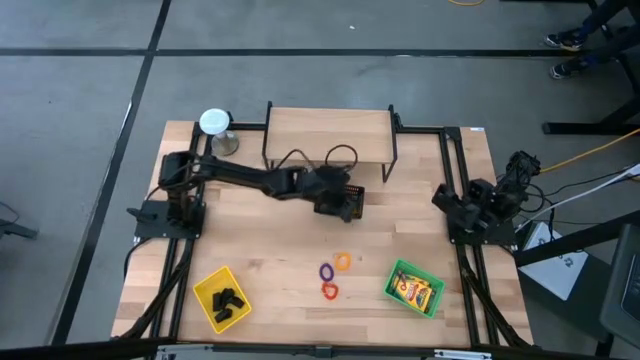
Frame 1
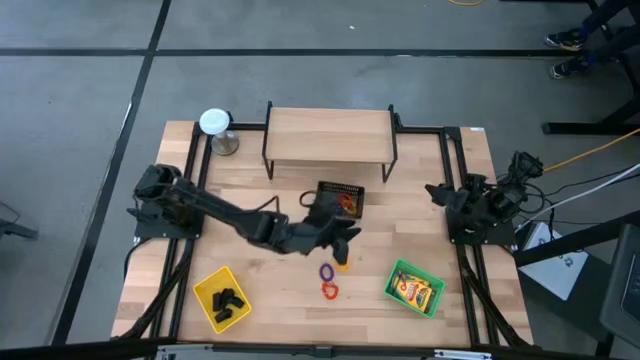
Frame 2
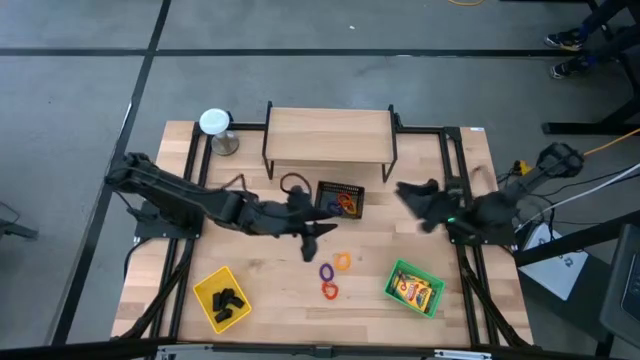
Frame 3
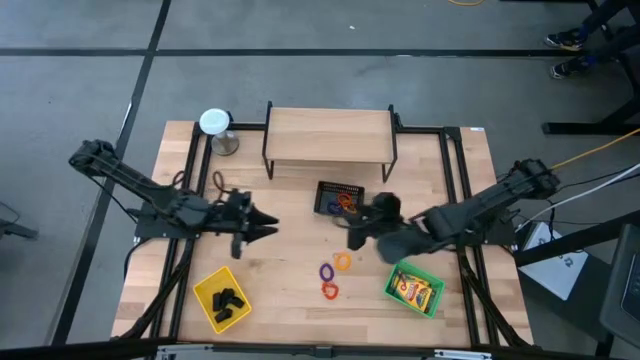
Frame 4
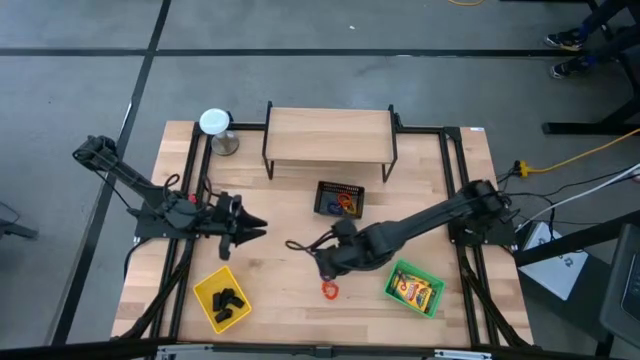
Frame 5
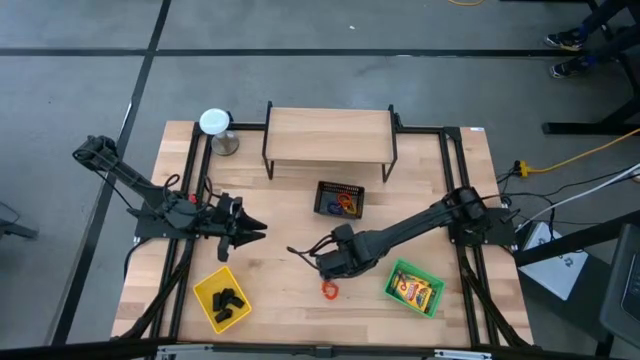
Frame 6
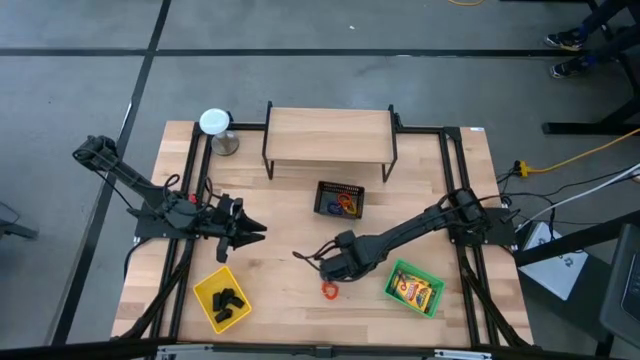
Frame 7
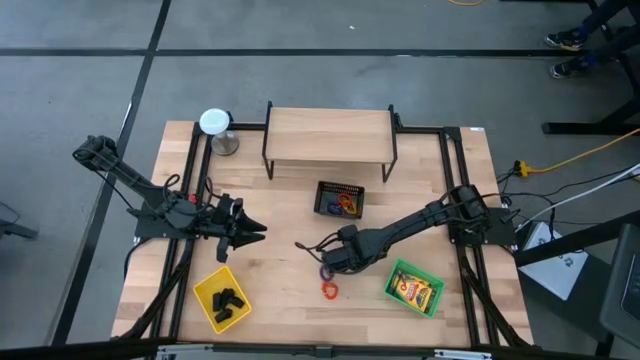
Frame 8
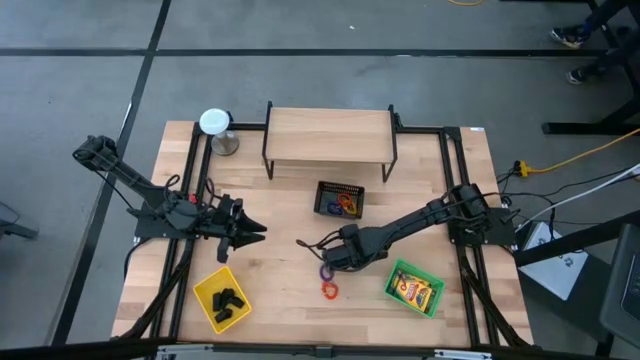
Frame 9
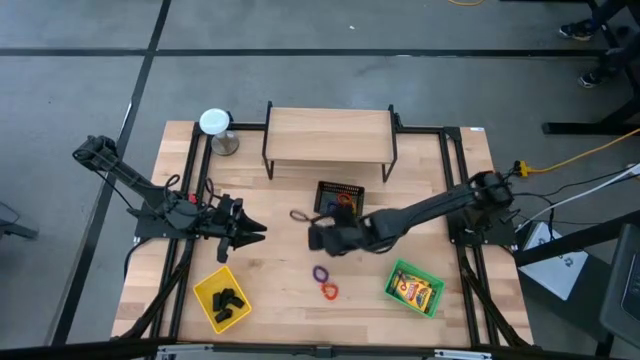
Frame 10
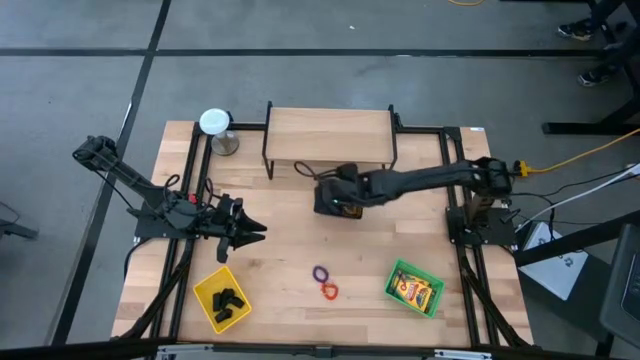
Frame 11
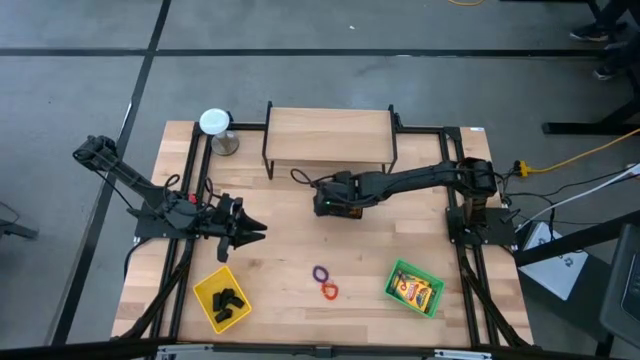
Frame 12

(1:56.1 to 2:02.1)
Task: Pick & Place Office Desk Supplies
Put the yellow spring keychain into the black basket

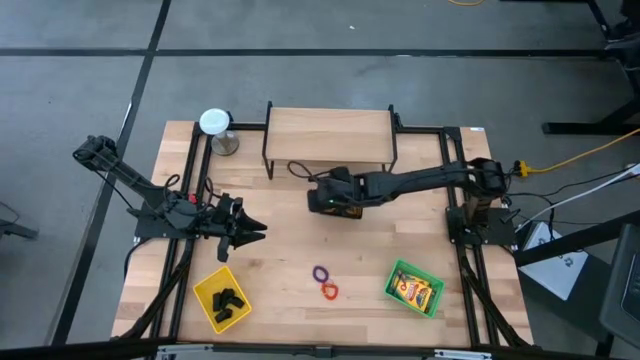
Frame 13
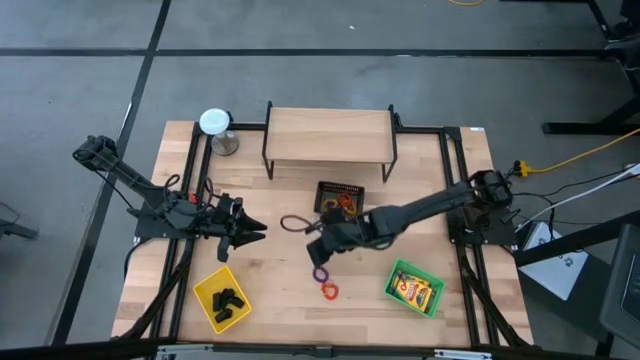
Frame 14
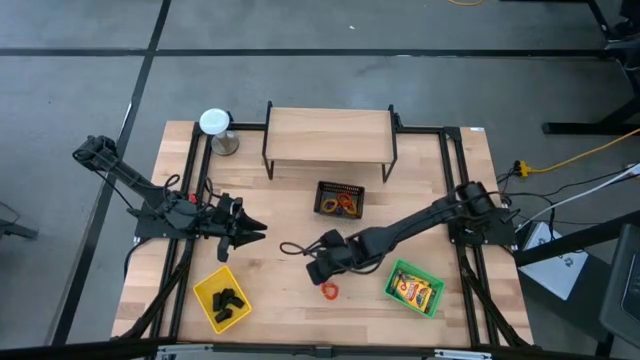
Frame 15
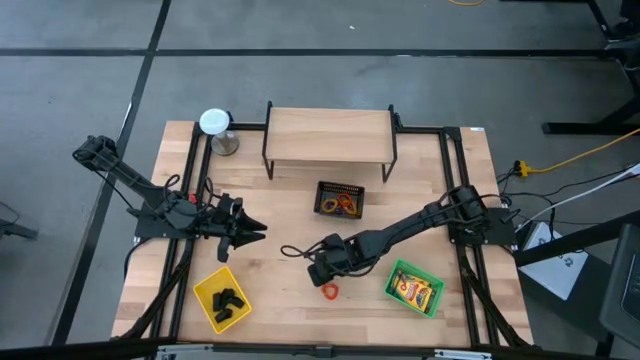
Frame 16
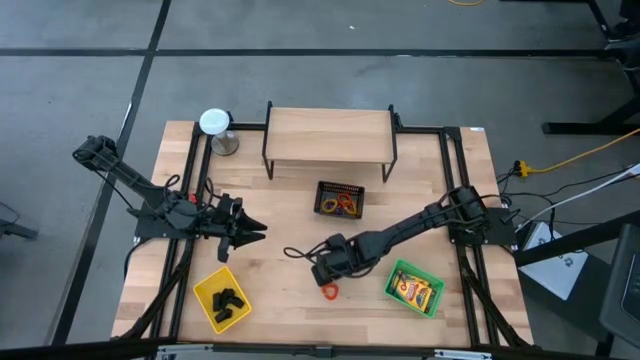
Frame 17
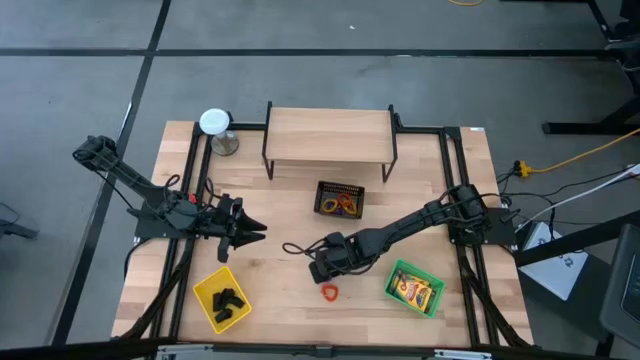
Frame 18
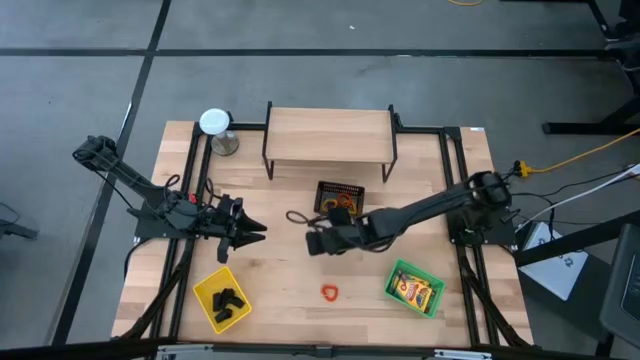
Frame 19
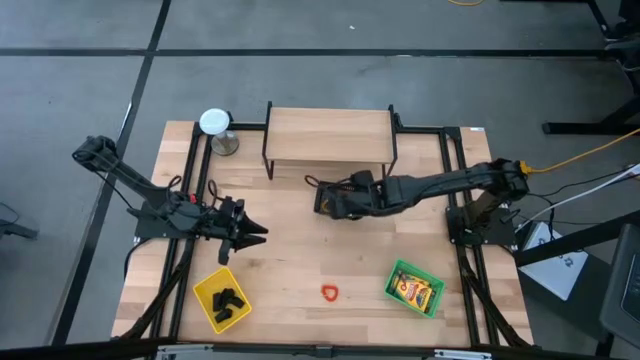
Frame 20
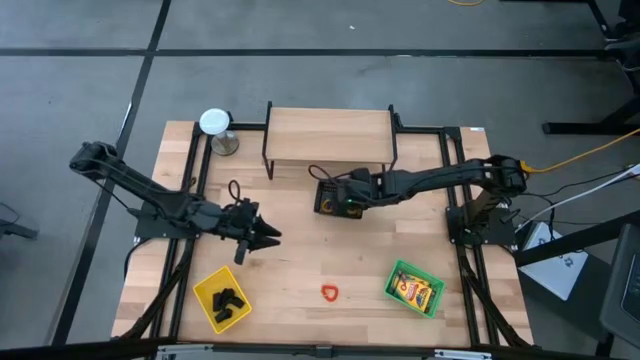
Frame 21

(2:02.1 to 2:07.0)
Put the purple spring keychain into the black basket

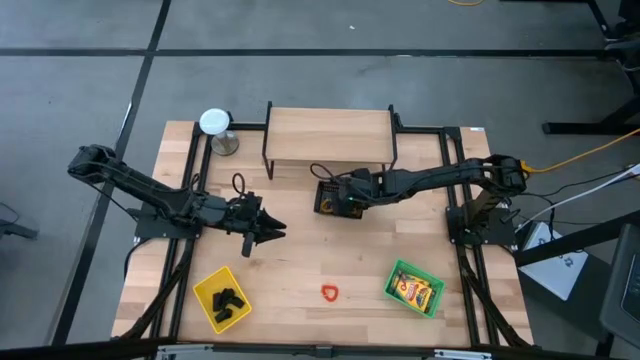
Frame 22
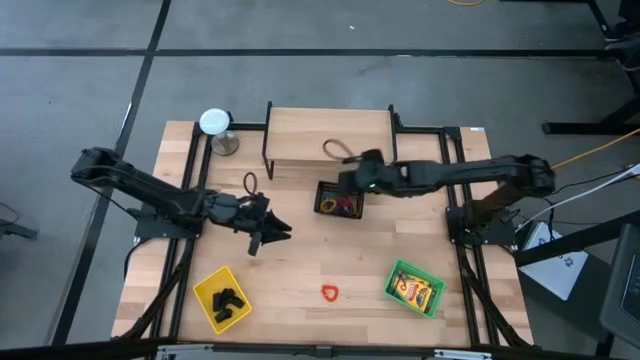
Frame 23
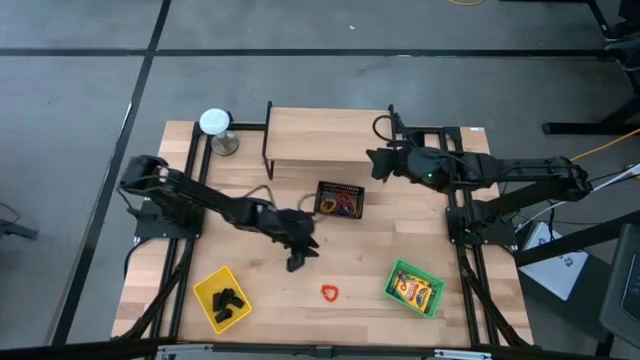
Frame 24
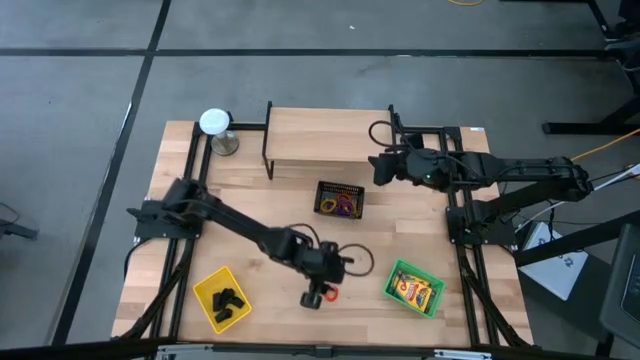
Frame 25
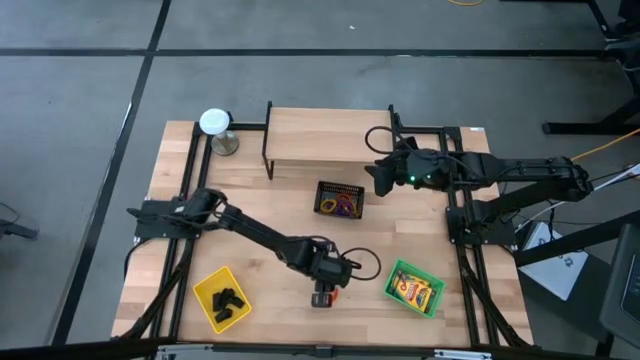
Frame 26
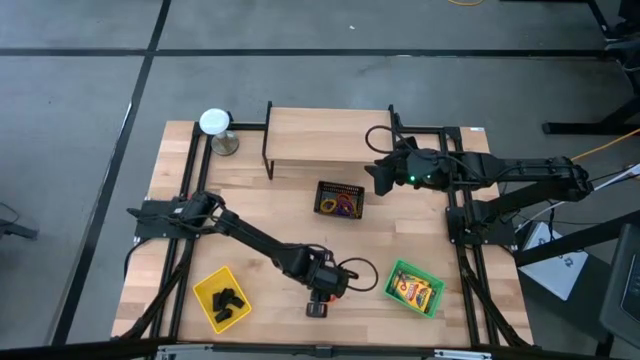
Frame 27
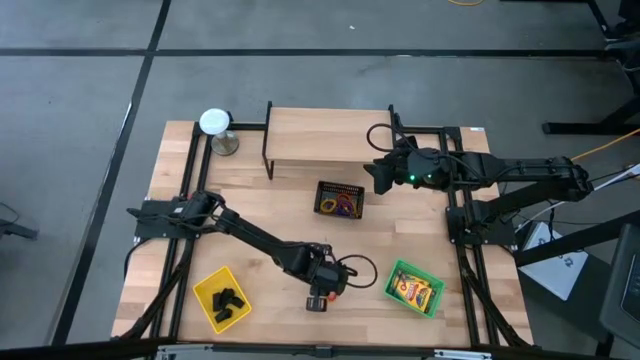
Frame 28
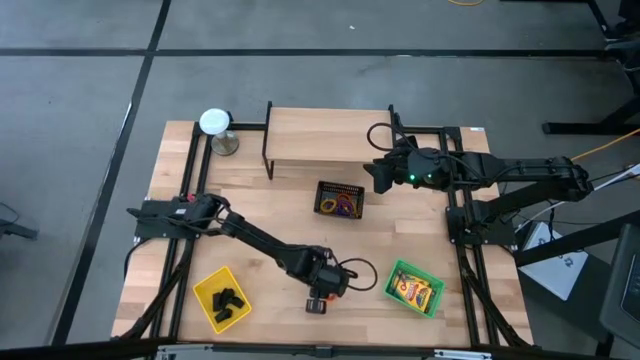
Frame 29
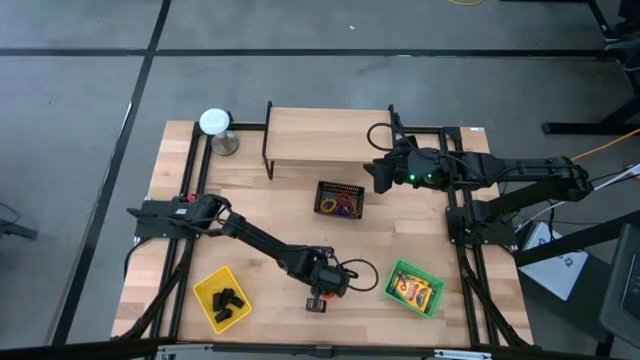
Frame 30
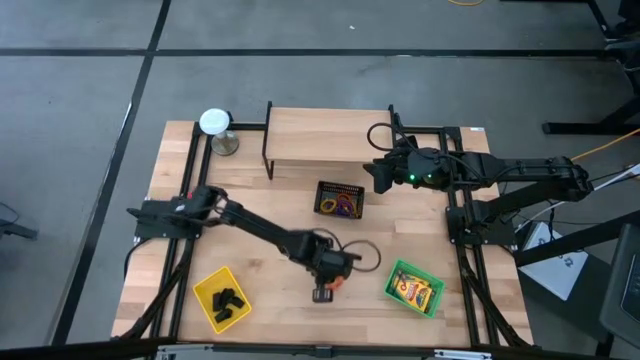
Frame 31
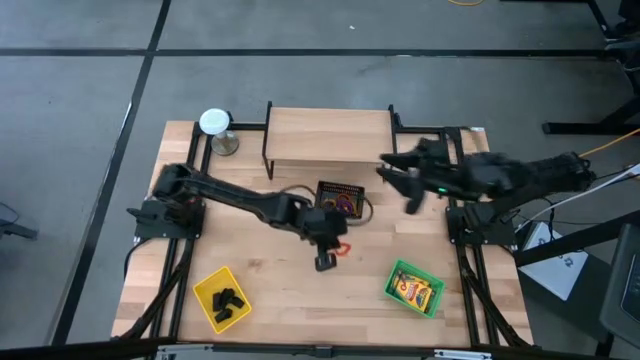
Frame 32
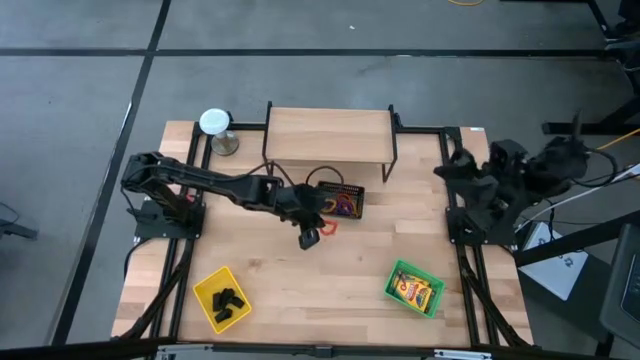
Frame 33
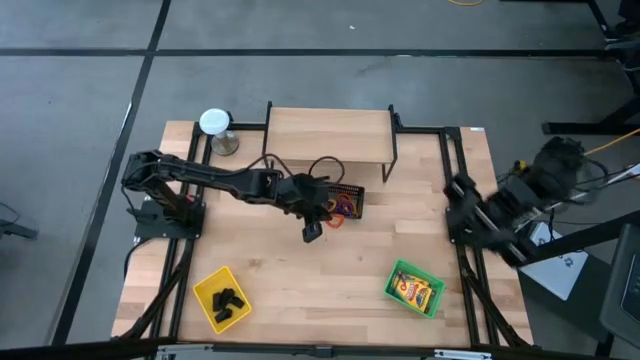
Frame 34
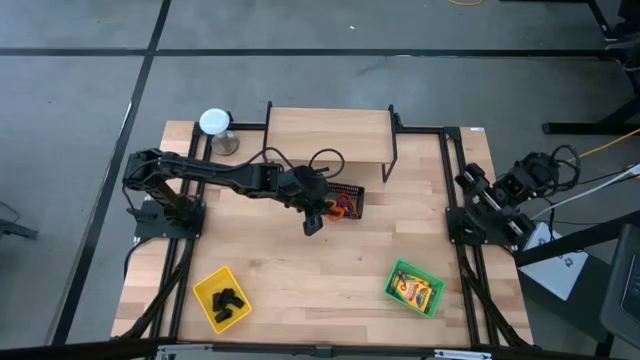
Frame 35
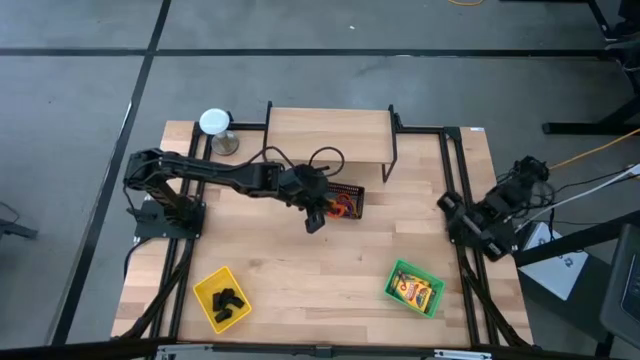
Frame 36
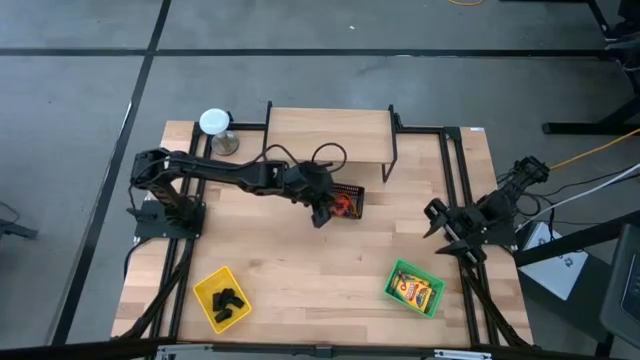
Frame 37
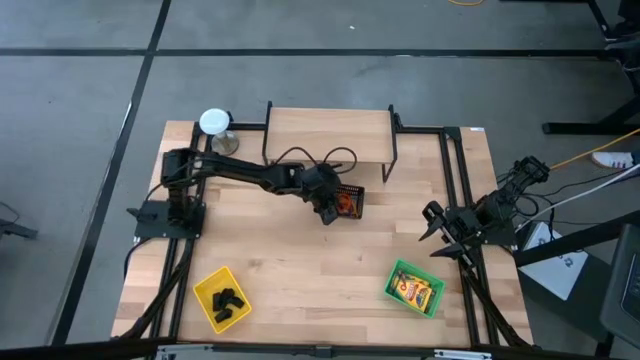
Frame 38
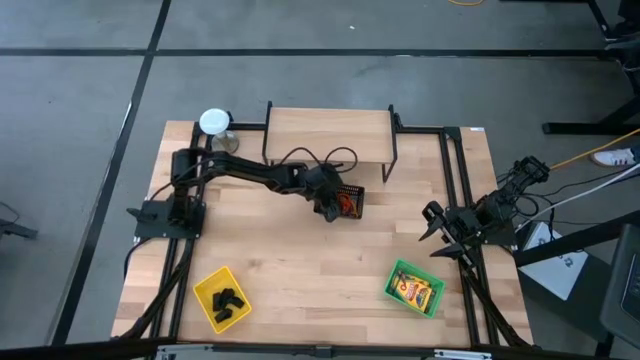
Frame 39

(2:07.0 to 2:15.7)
Put the orange spring keychain into the black basket

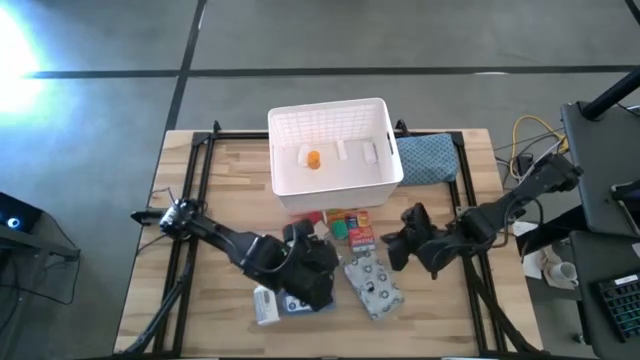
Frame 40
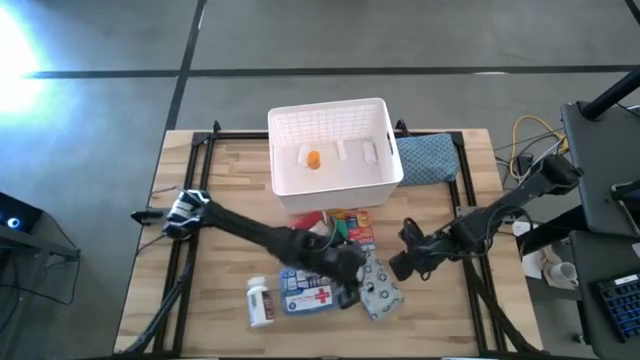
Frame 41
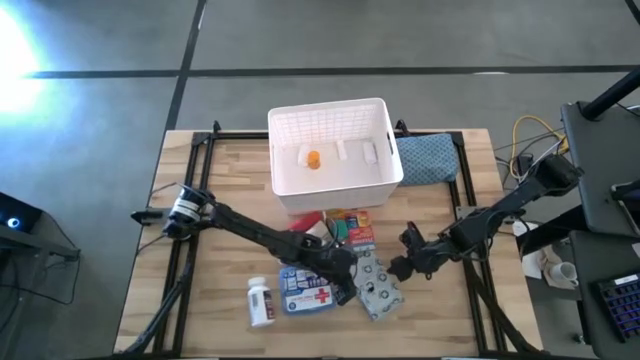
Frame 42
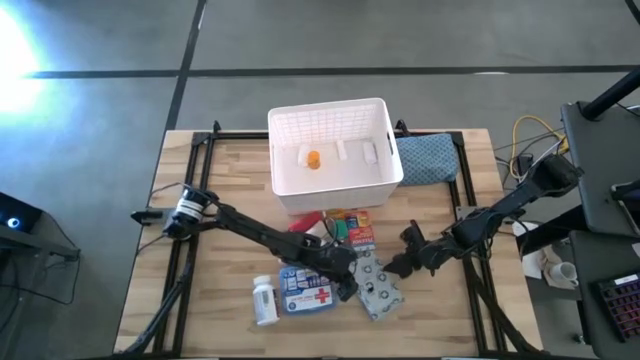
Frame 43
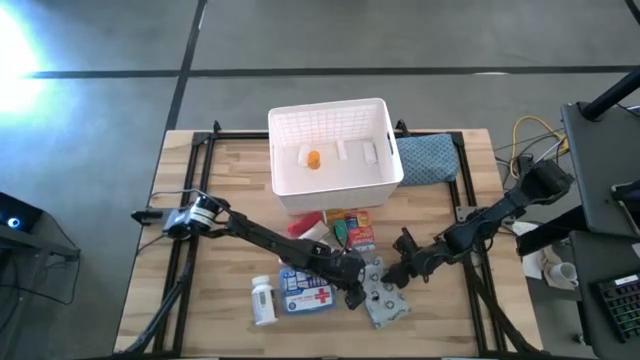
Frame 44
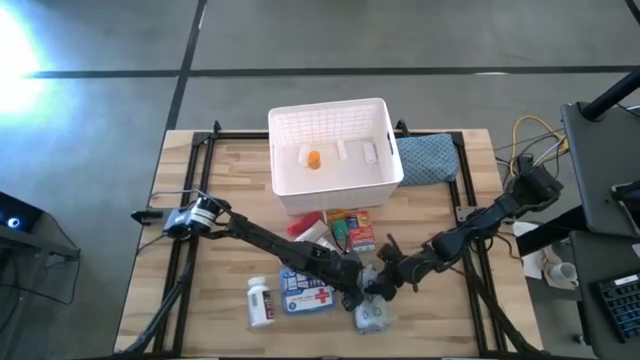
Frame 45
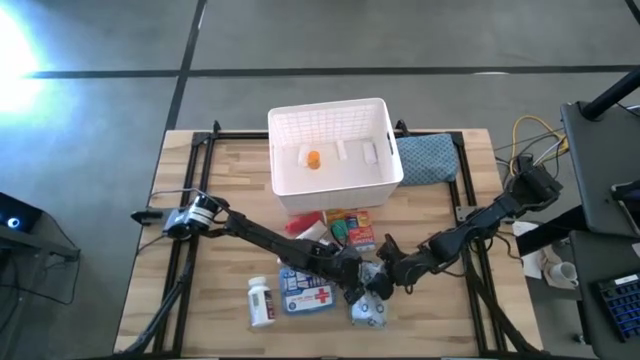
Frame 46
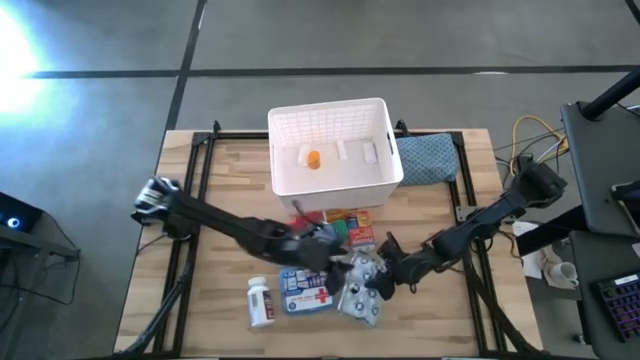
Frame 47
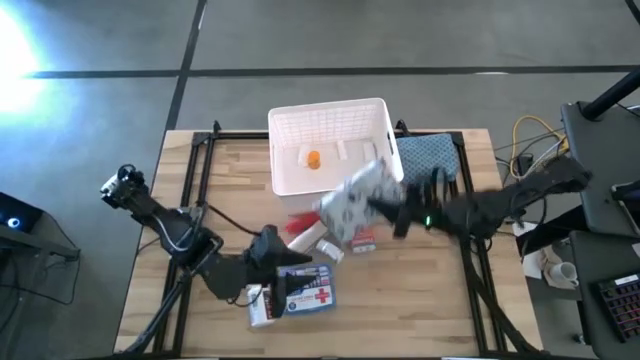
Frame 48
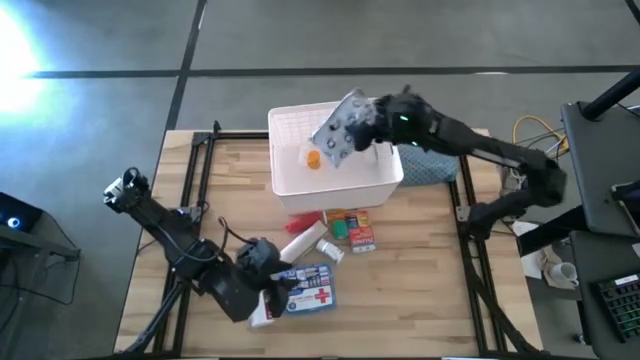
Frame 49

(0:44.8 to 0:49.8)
Task: Pick & place medical supplies in basket/bin
Put the white mailer bag into the white container
